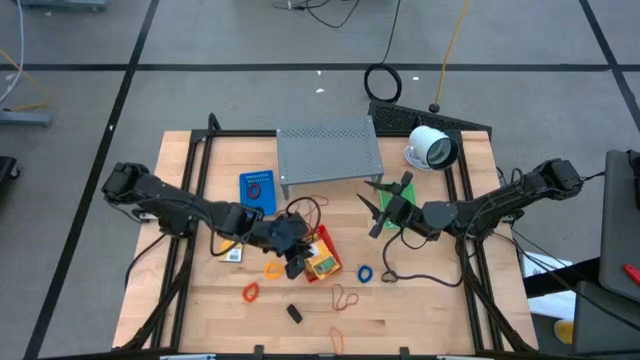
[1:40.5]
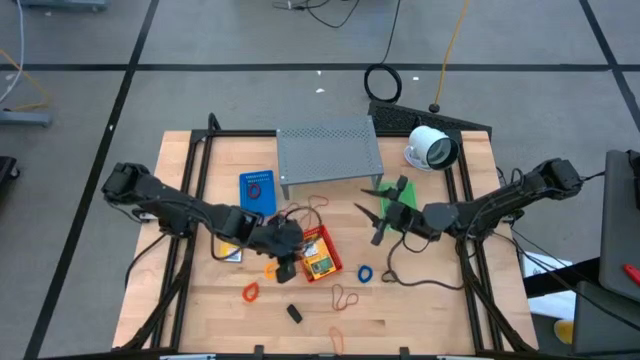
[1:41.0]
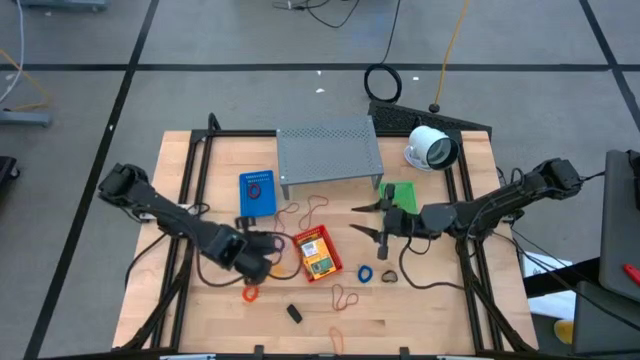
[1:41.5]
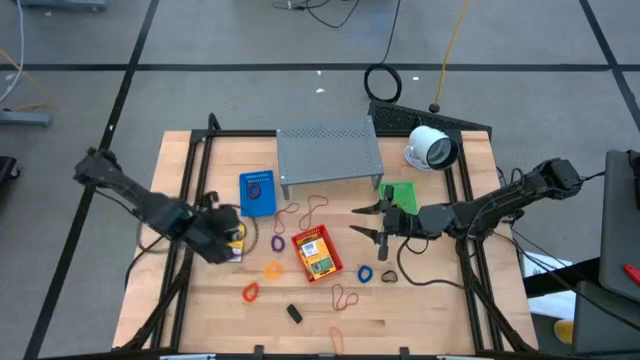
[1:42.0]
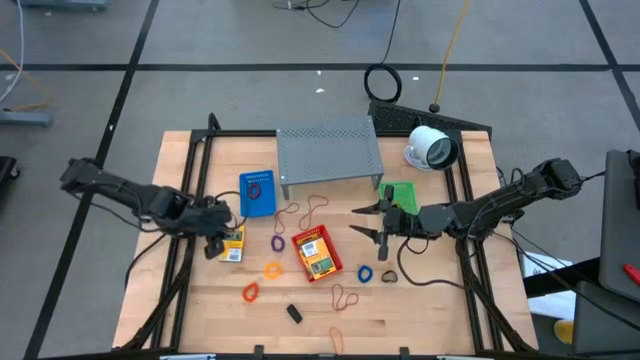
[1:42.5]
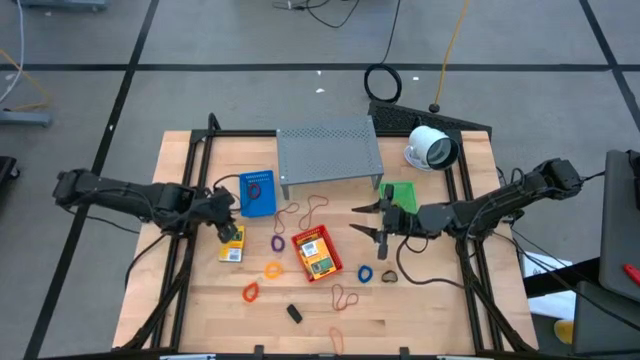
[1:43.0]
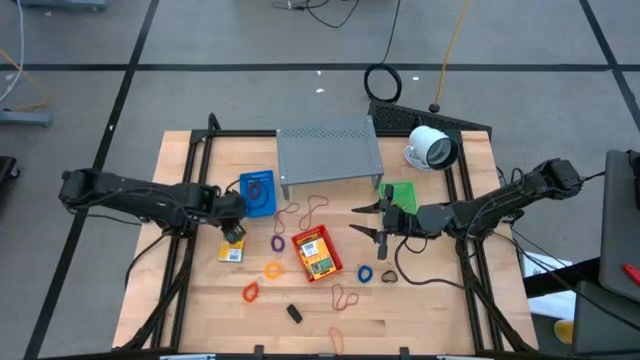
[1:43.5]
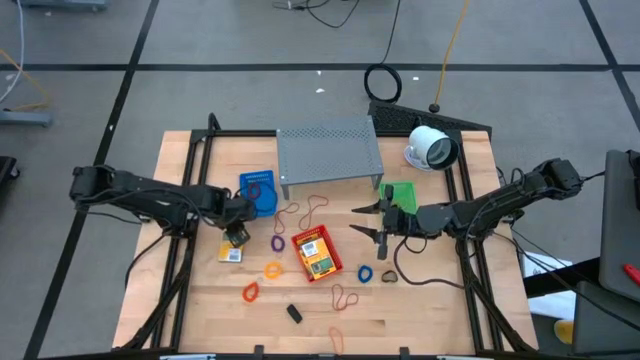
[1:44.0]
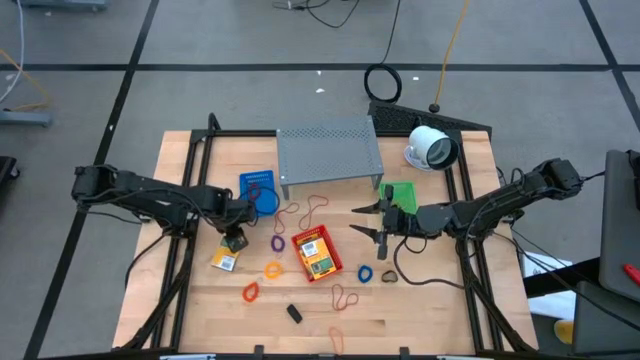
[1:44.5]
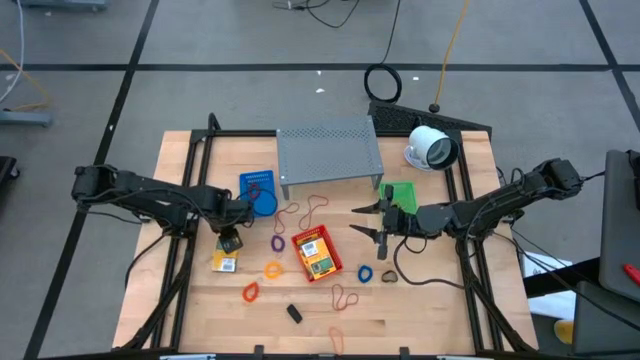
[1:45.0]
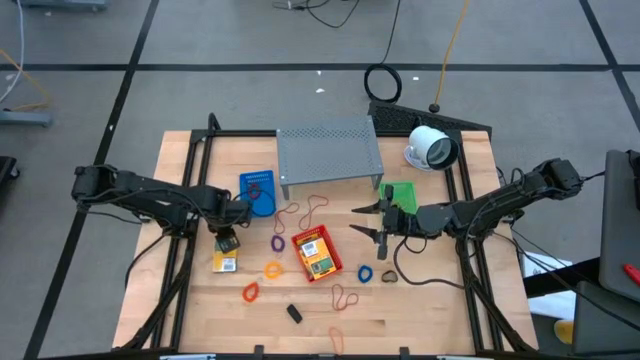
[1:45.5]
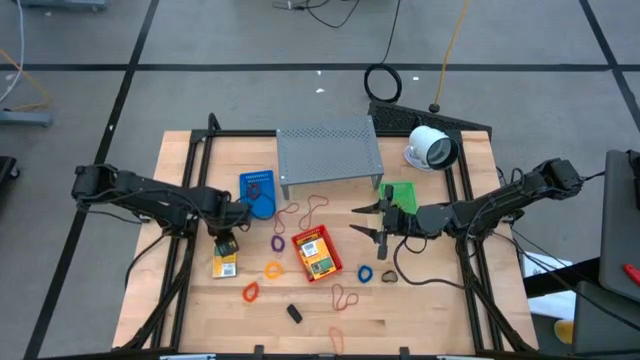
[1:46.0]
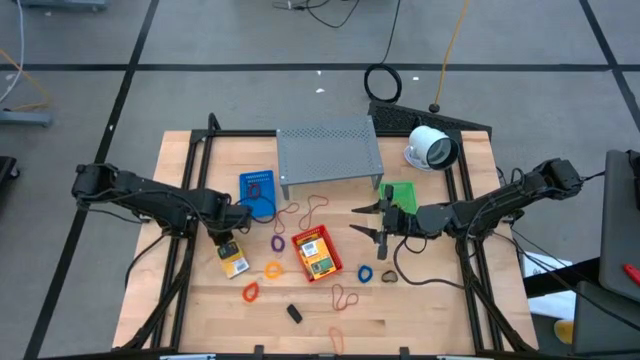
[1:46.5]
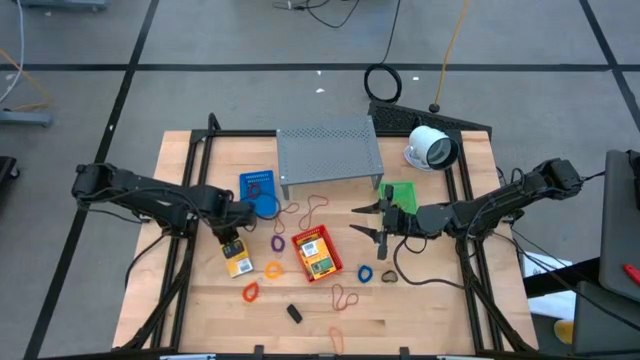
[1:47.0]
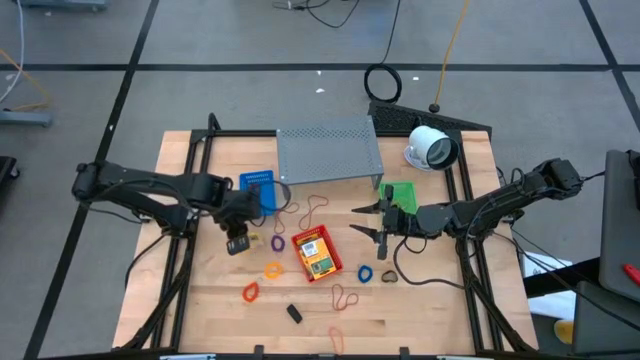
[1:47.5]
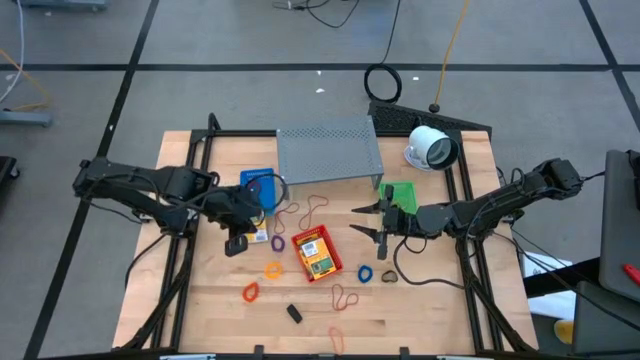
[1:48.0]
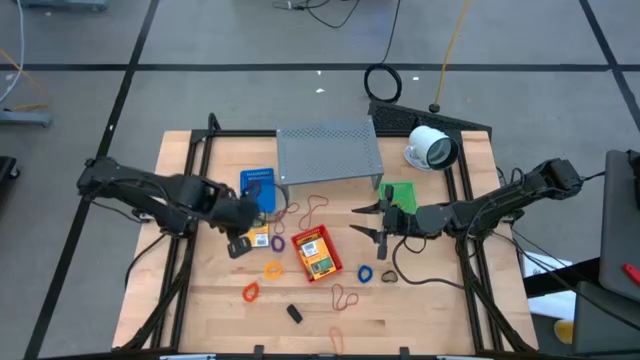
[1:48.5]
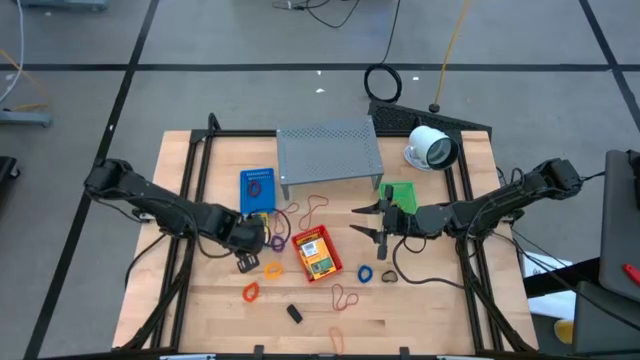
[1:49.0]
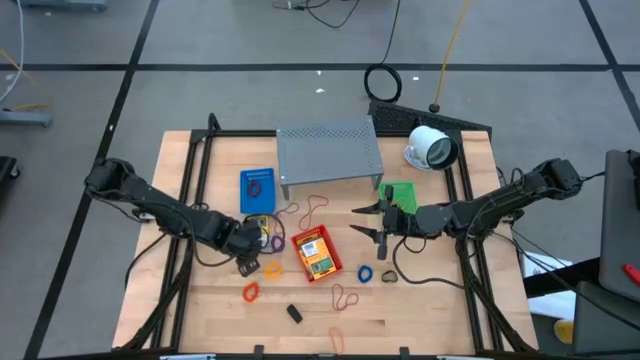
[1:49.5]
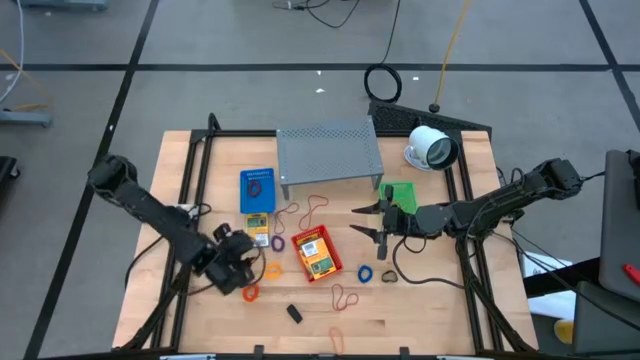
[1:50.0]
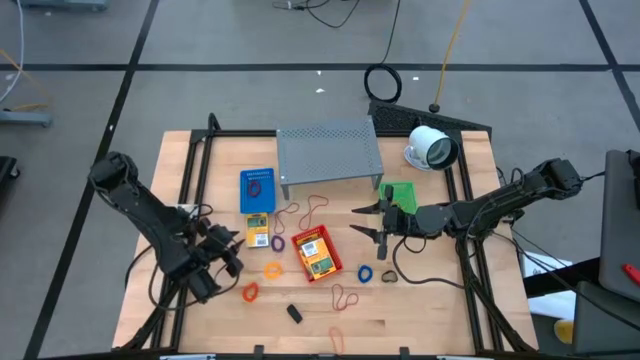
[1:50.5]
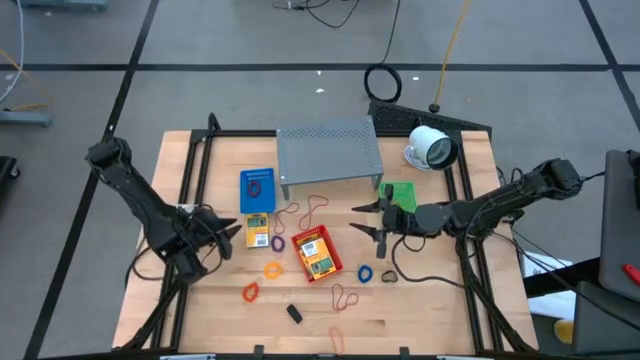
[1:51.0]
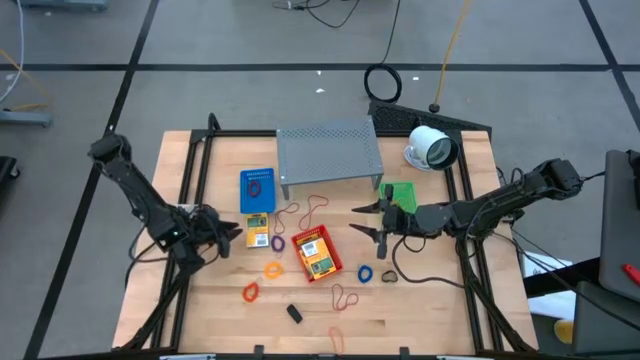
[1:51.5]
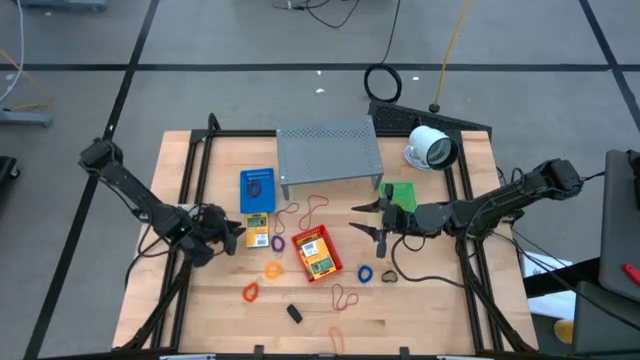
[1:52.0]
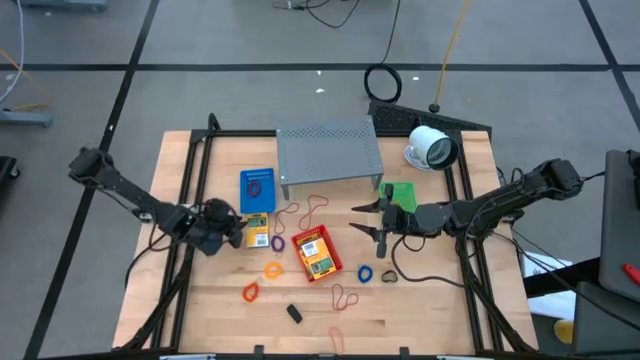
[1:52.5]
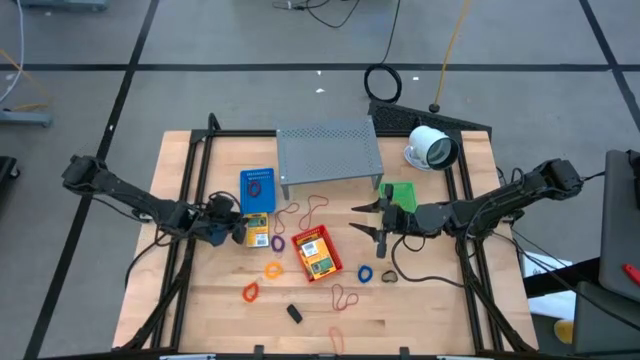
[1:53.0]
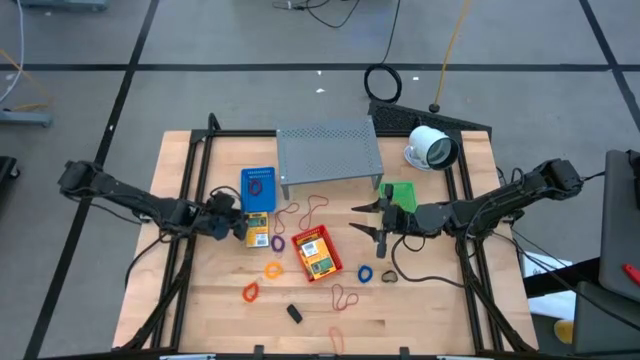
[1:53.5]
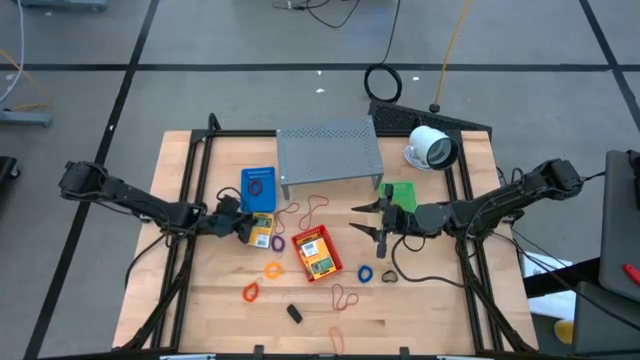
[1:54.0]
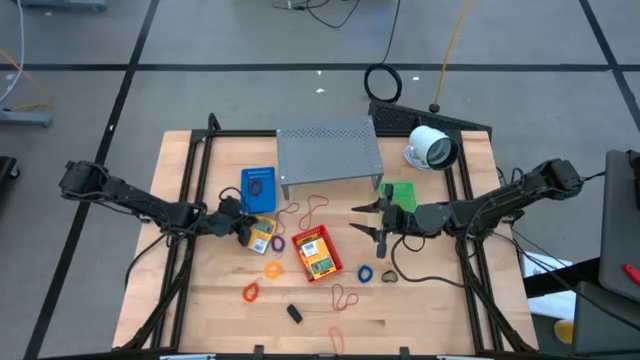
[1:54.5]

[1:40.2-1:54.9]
Task: Pick & Place Office Desk Supplies
Put the yellow crayon box into the red bin

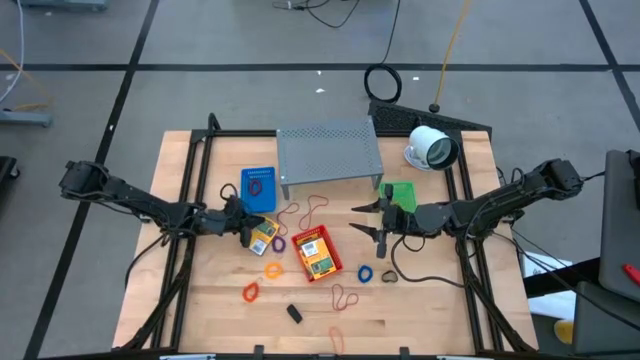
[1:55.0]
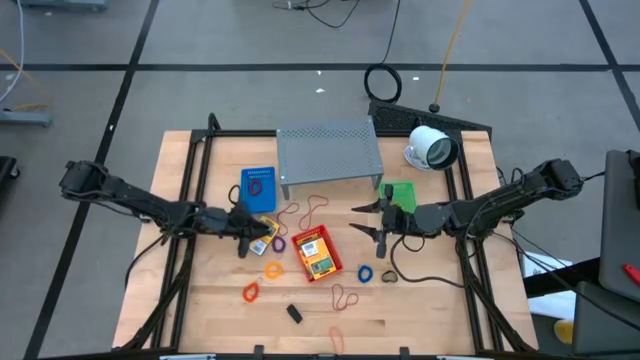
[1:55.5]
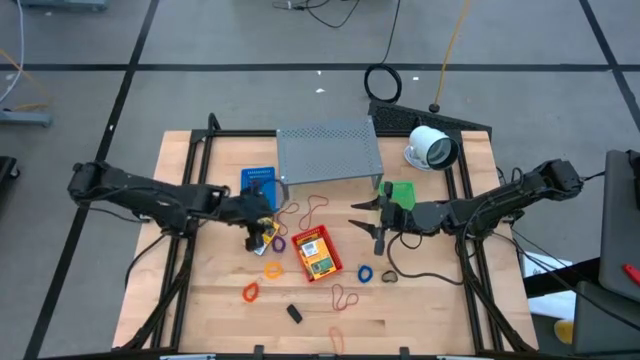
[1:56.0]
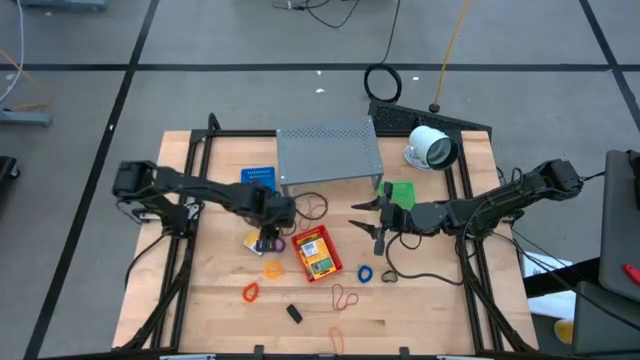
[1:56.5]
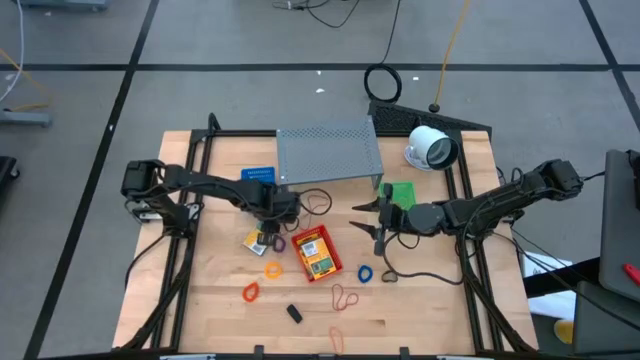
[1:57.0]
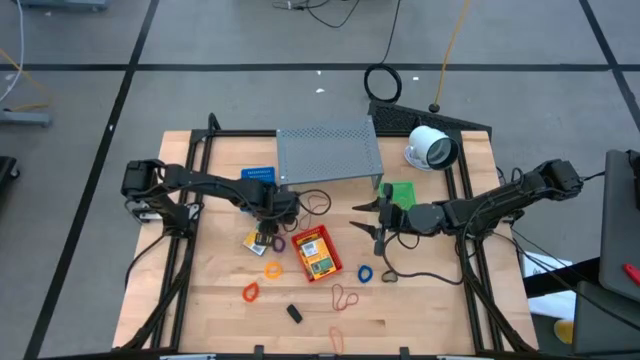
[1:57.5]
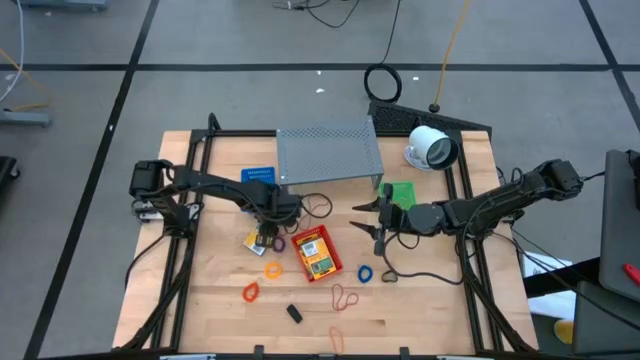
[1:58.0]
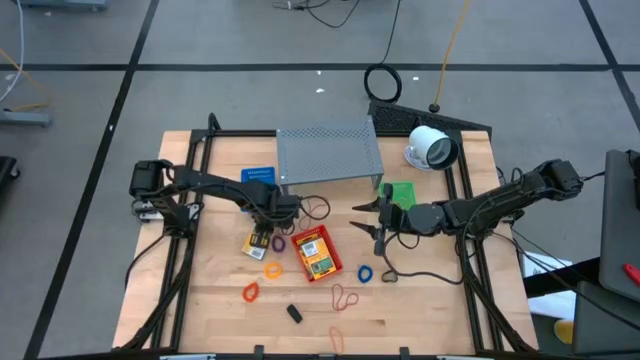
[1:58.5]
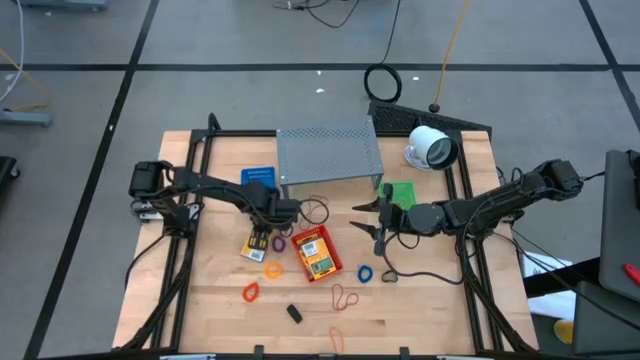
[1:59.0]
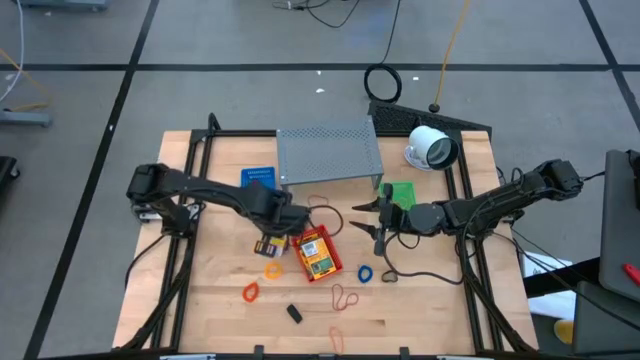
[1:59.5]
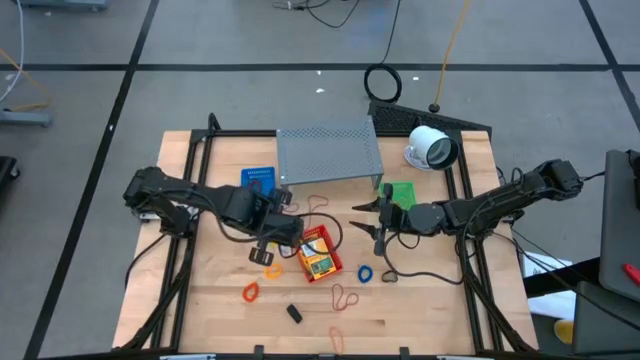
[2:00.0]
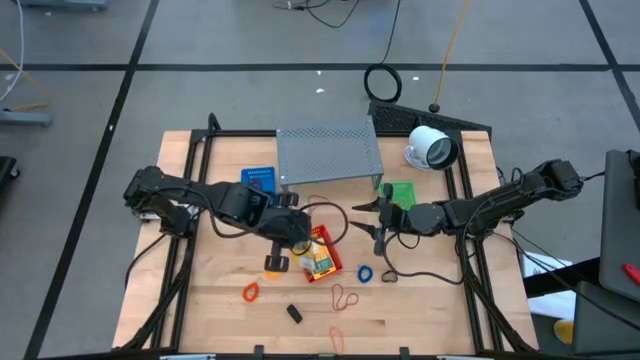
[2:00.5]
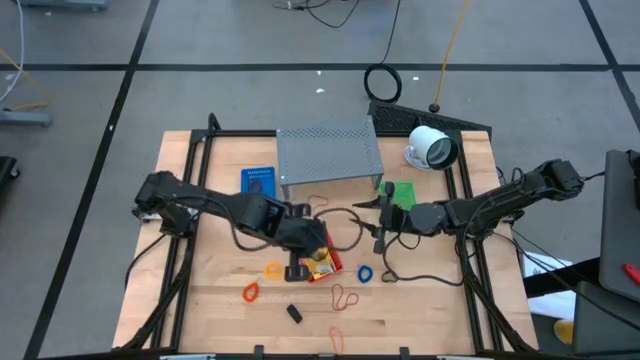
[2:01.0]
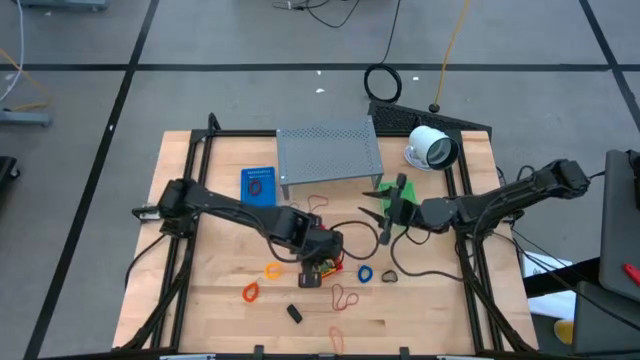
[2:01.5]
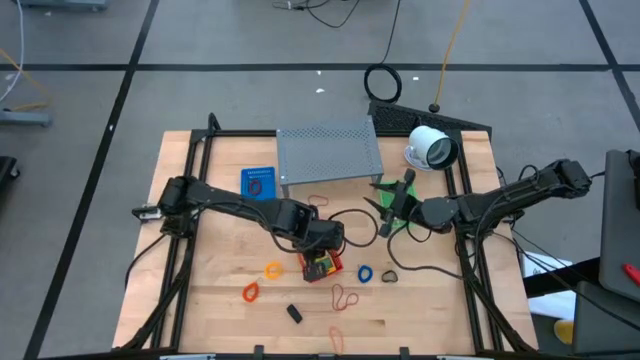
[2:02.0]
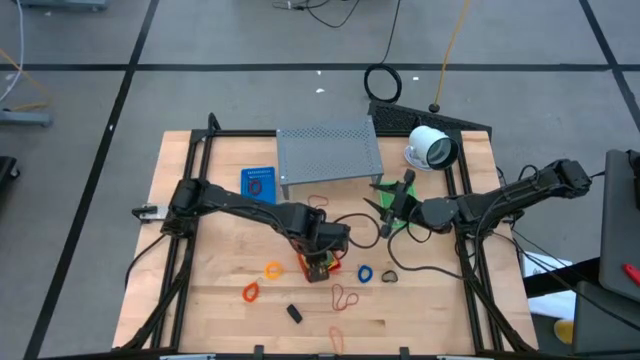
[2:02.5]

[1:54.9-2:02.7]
Put the yellow crayon box into the red bin
